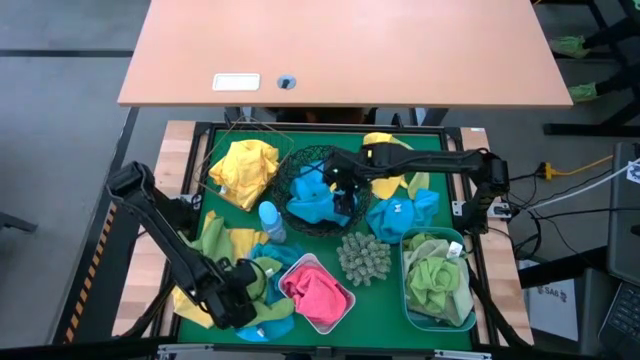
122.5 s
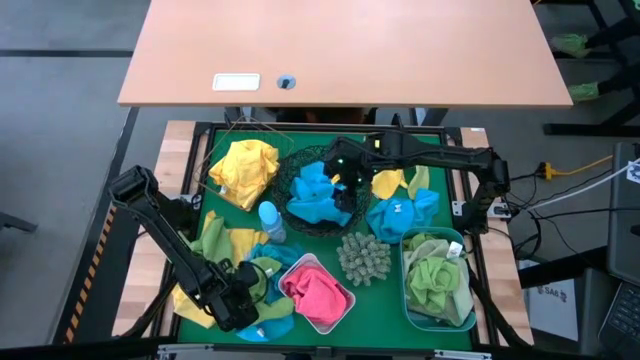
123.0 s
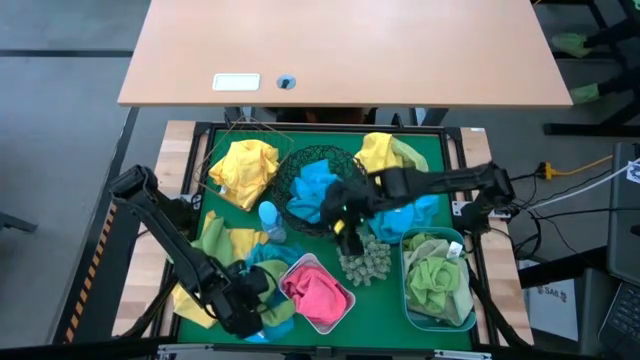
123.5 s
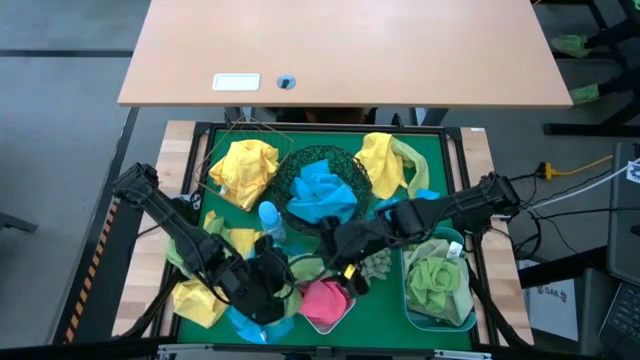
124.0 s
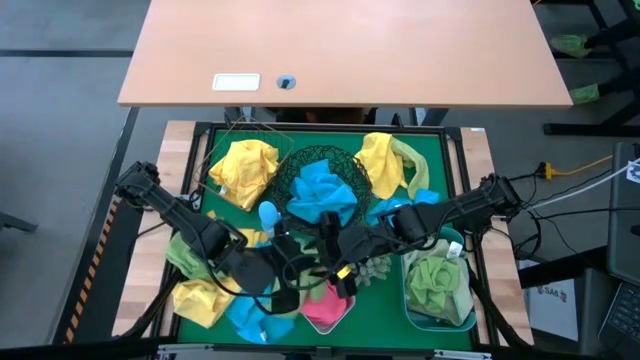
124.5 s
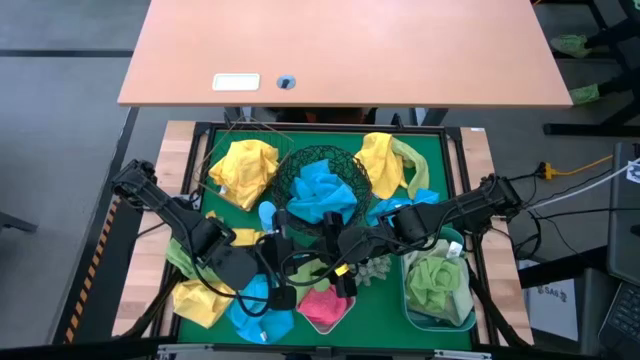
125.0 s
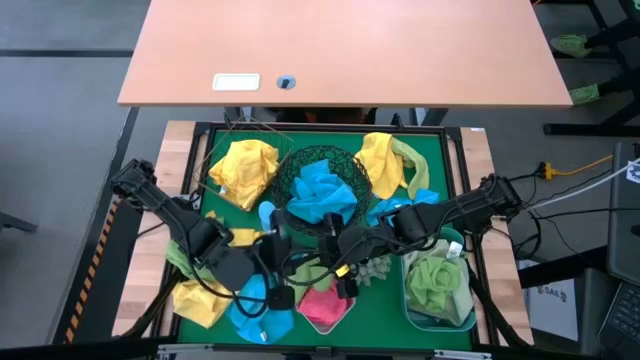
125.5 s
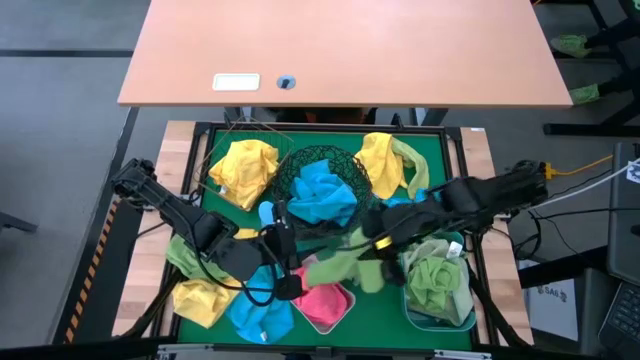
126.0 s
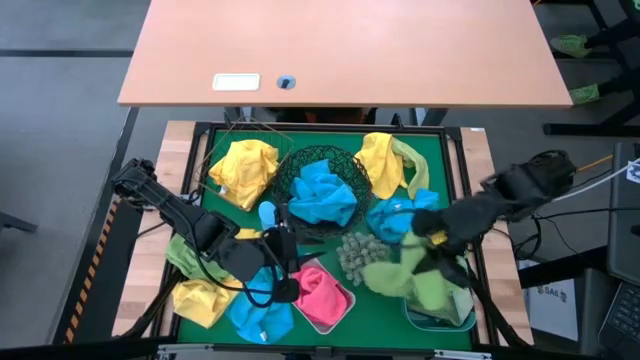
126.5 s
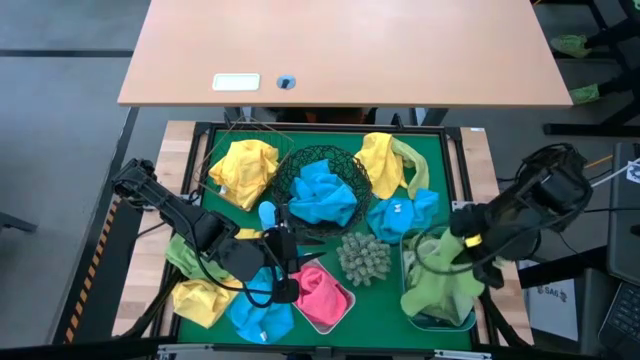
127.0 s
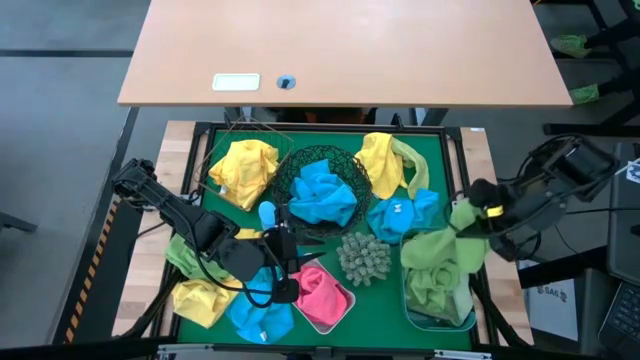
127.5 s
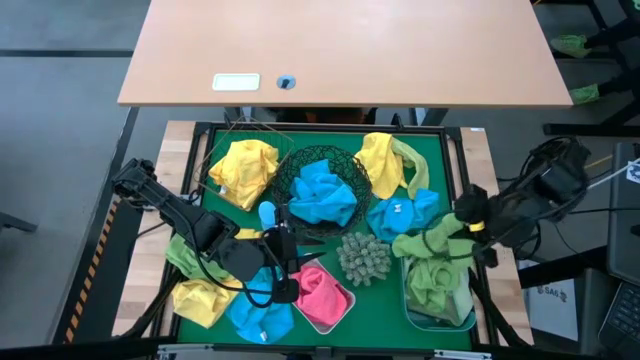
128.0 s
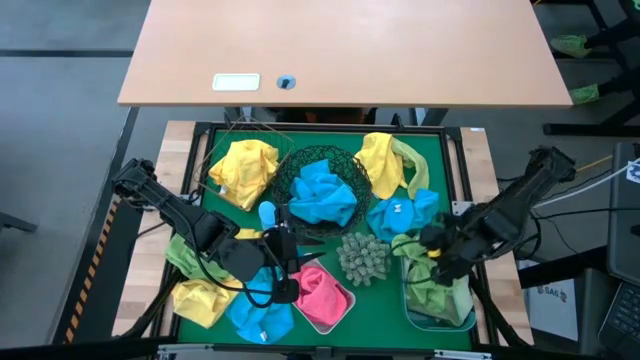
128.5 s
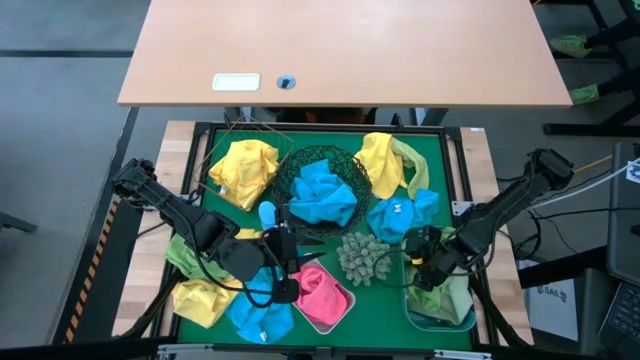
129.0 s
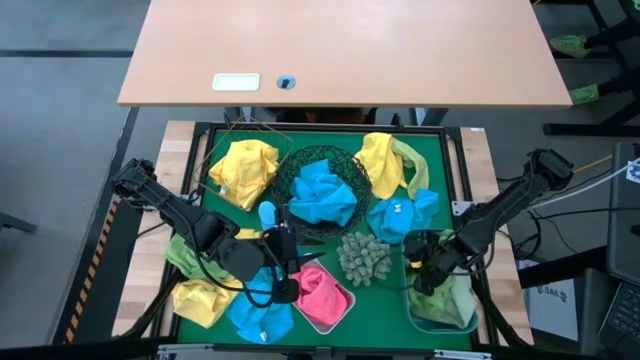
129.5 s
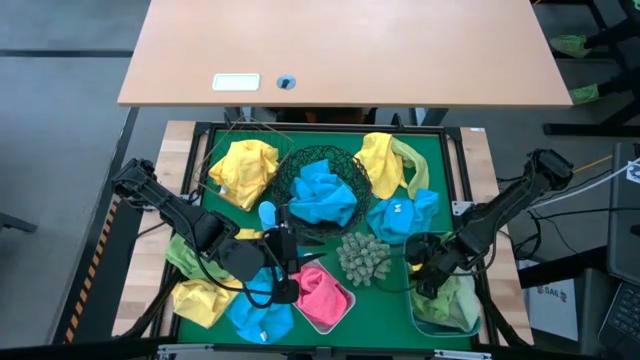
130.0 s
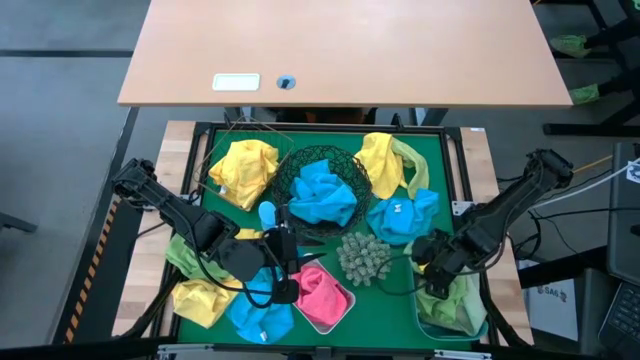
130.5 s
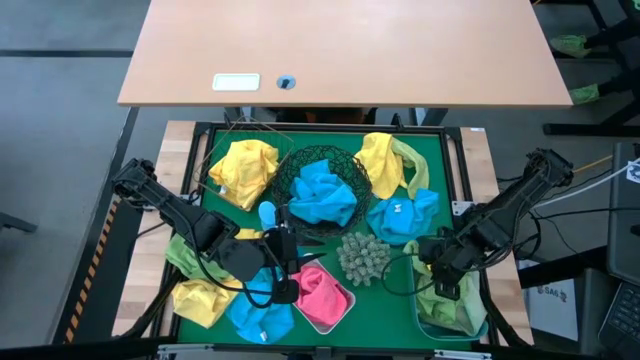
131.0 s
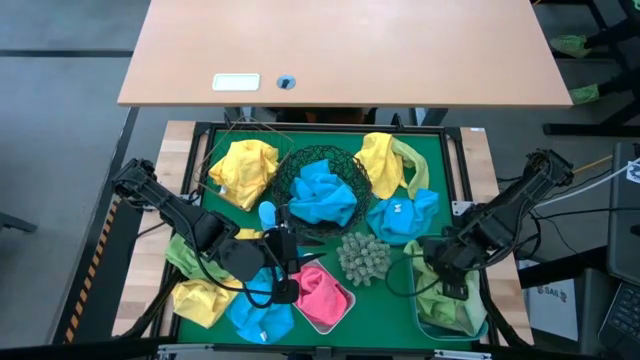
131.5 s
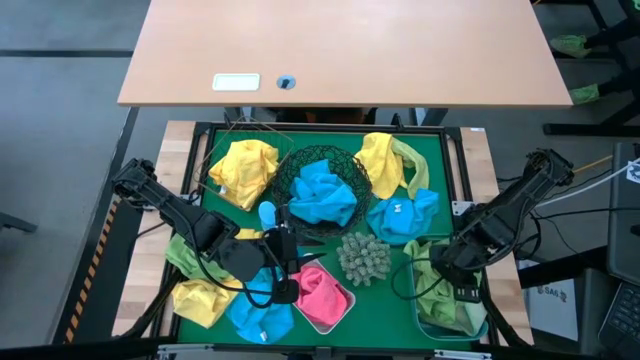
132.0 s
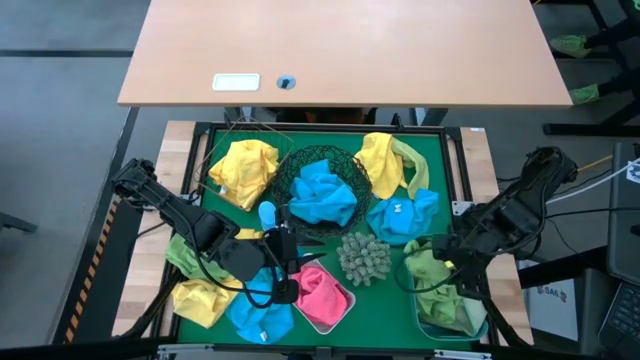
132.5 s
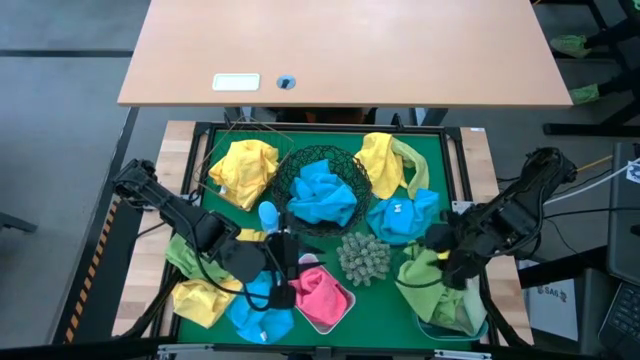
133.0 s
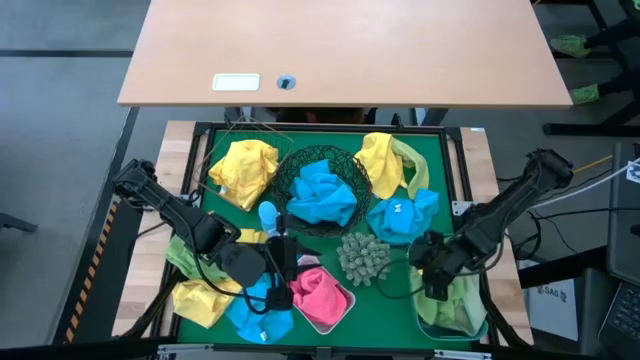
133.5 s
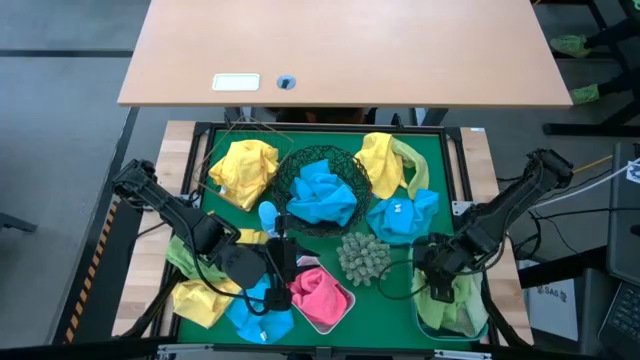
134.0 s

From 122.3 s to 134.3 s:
Task: Sort microfiber towel by color & place in baskets
Put the green microfiber cloth into the blue bin

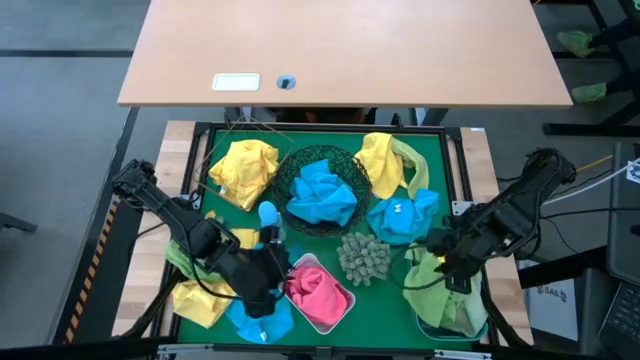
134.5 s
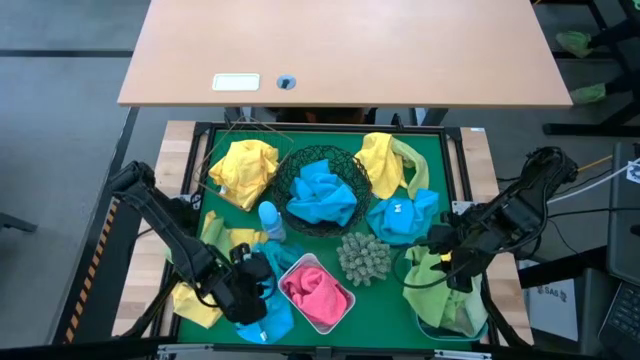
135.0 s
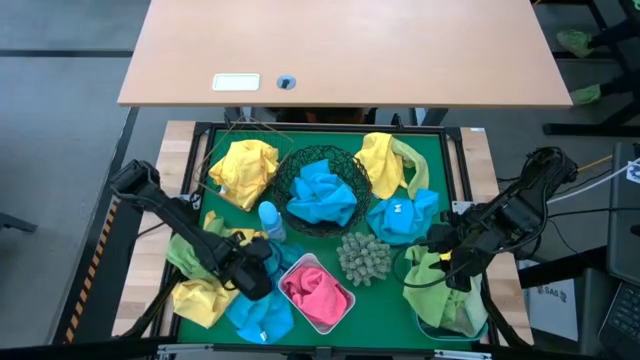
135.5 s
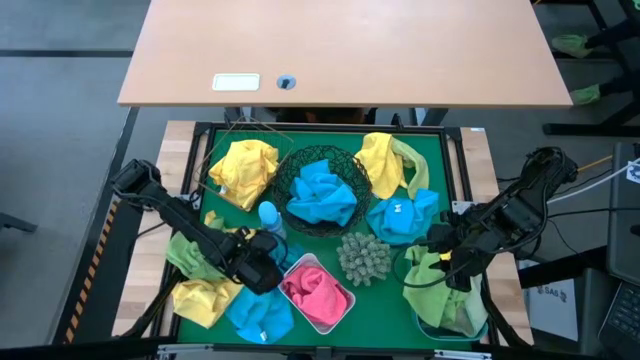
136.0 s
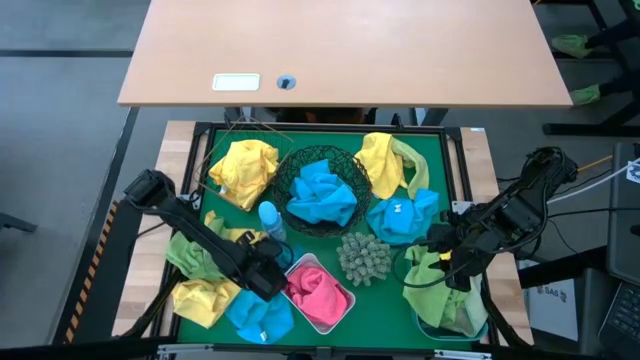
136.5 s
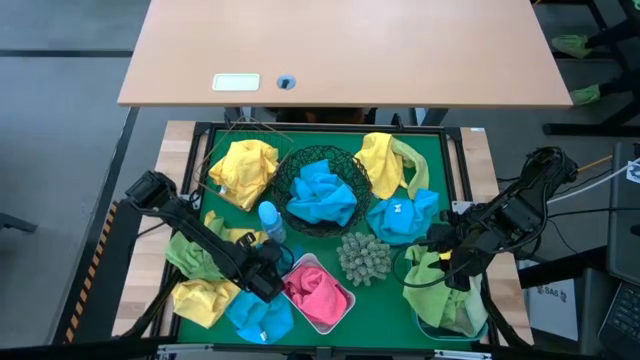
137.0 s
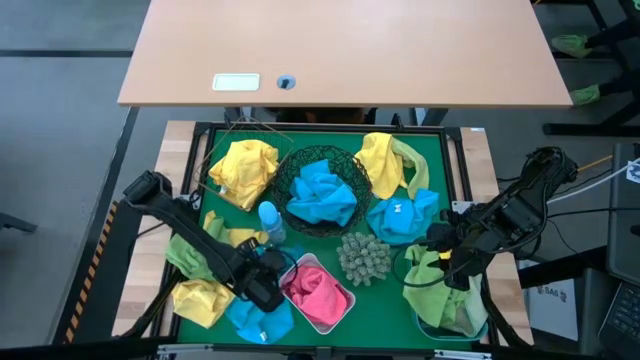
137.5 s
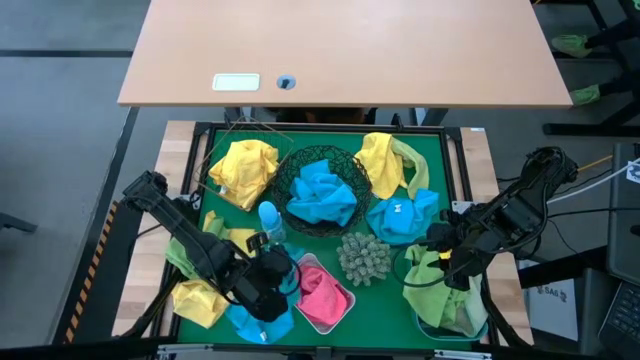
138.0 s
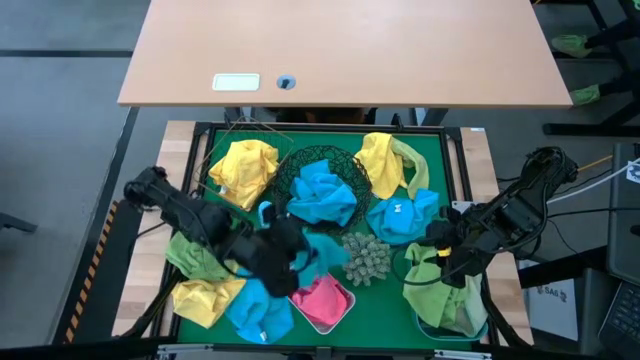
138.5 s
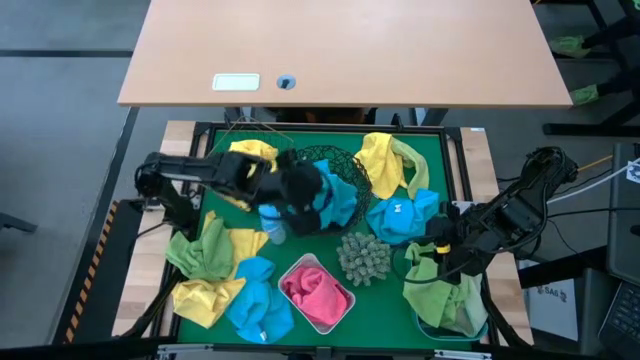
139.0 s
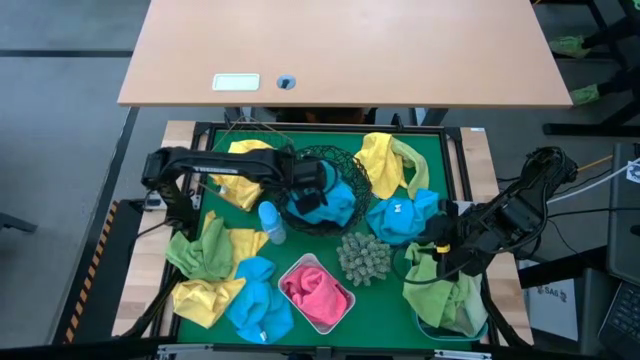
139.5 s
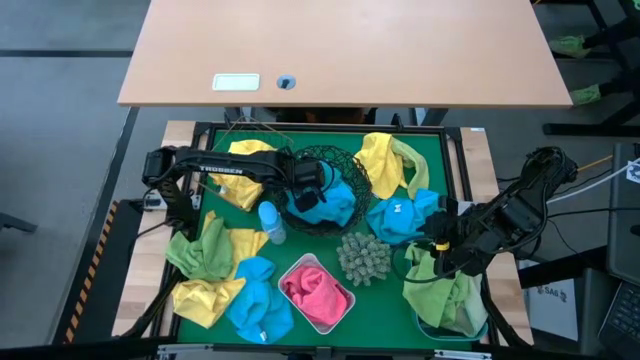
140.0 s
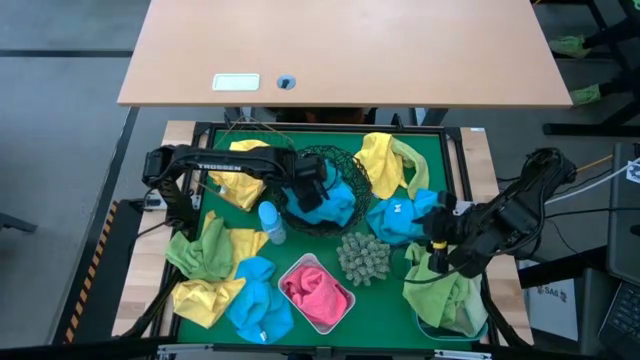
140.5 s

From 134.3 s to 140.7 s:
Put the blue microfiber cloth into the circular wire basket

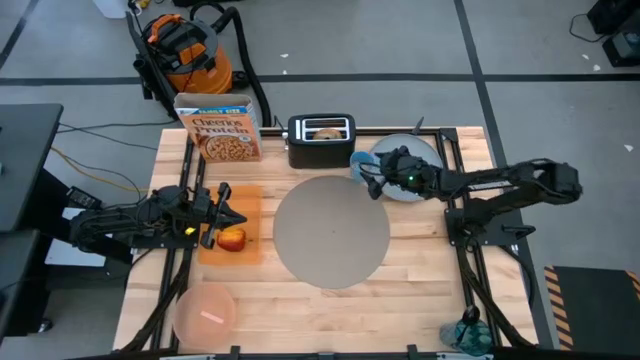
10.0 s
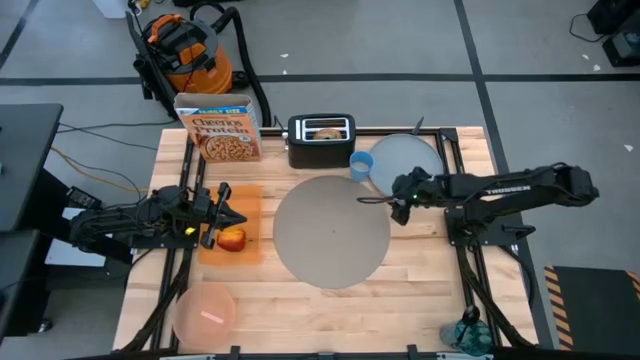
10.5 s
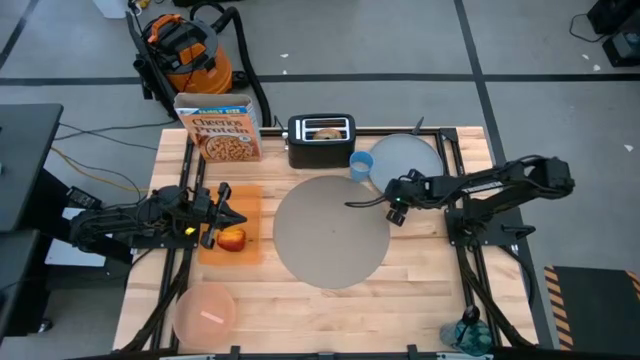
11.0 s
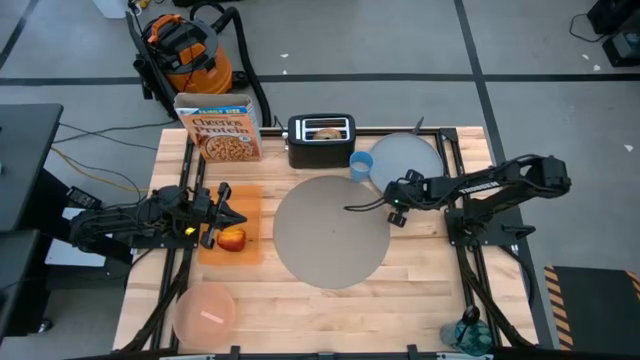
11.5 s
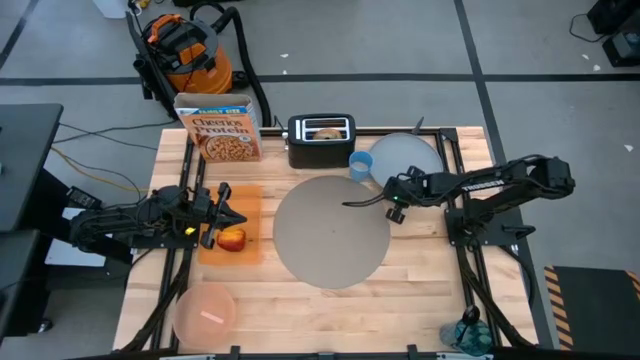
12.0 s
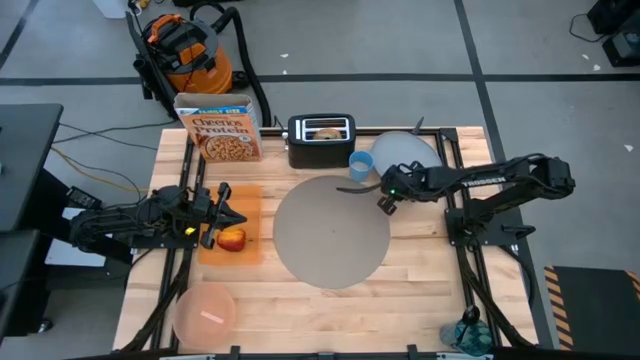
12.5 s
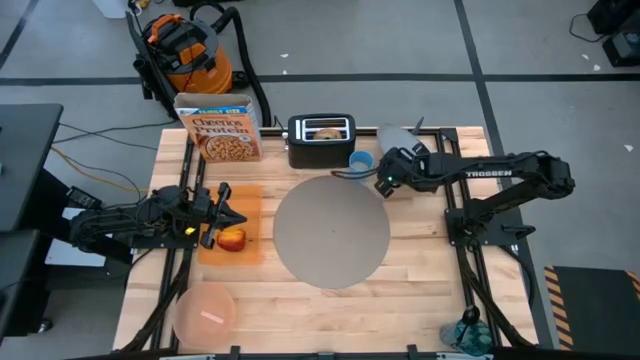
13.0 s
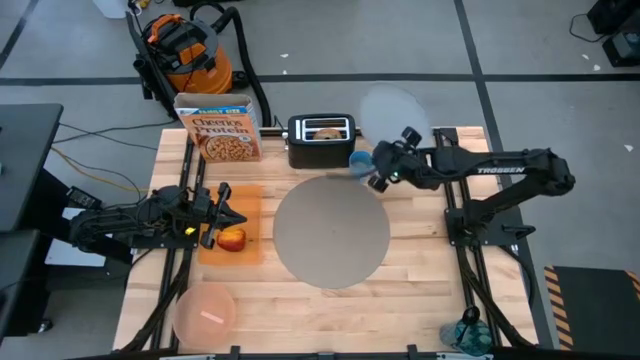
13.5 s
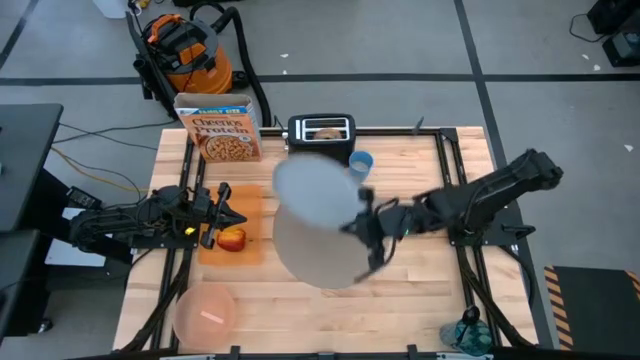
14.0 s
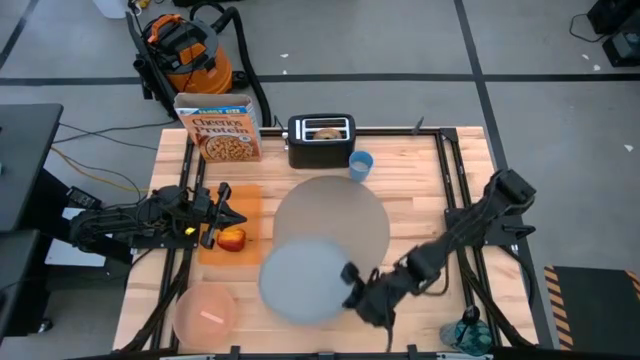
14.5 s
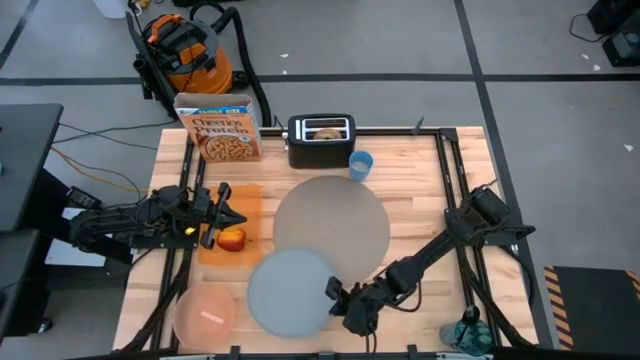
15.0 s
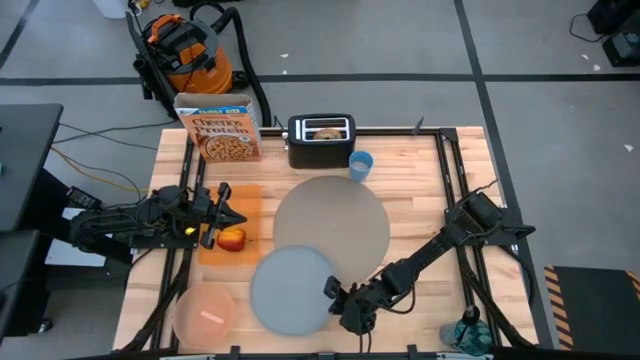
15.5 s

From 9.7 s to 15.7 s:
Task: Arrange a breakfast setting
Put the blue plate on the table to the bottom left of the gray table mat
